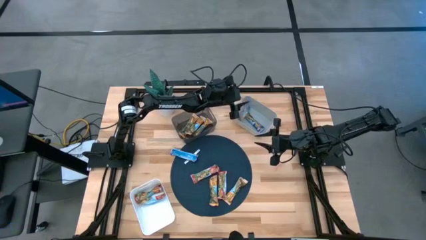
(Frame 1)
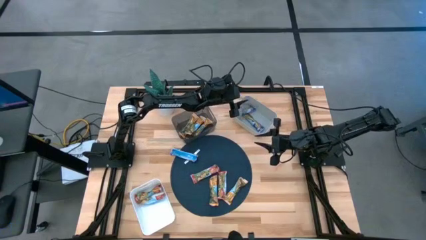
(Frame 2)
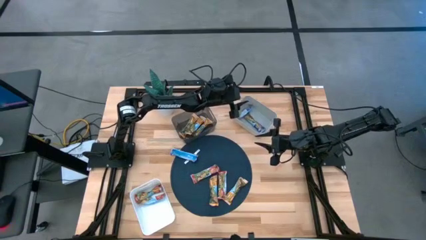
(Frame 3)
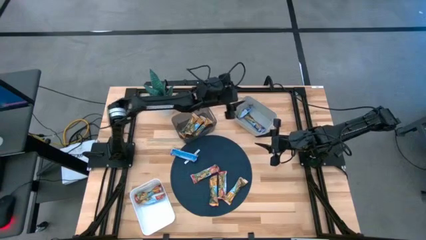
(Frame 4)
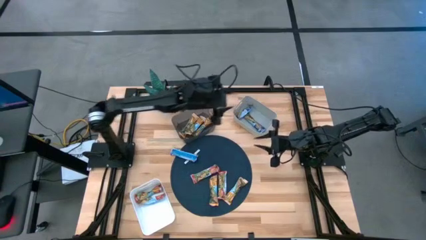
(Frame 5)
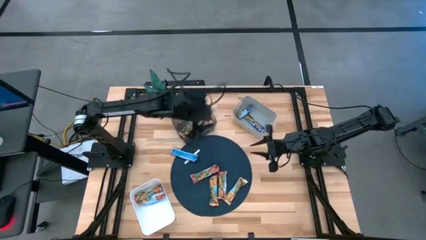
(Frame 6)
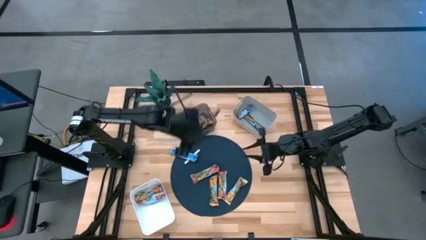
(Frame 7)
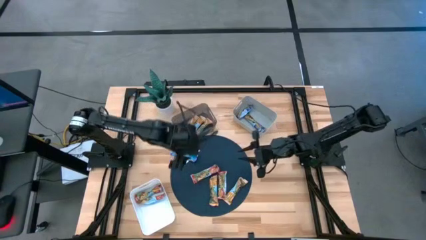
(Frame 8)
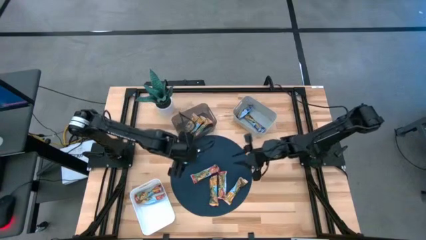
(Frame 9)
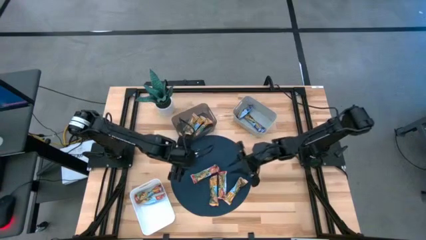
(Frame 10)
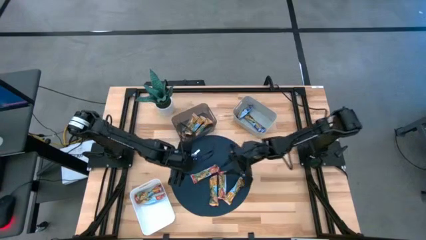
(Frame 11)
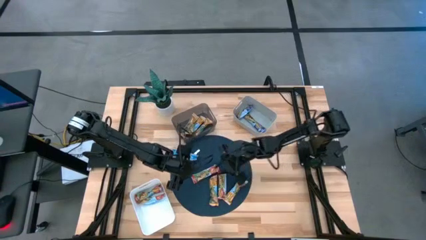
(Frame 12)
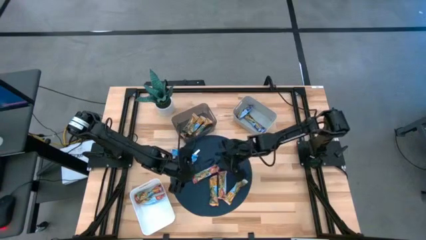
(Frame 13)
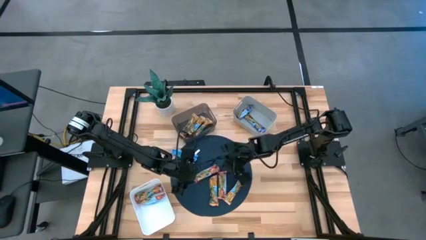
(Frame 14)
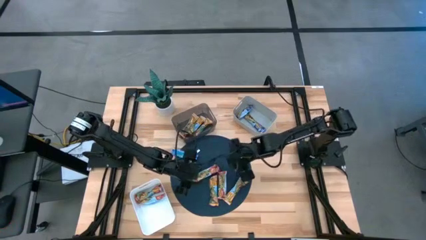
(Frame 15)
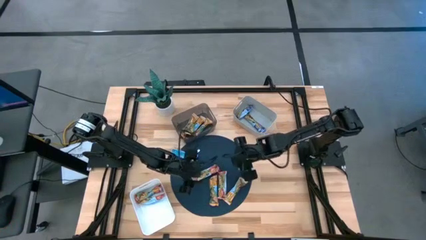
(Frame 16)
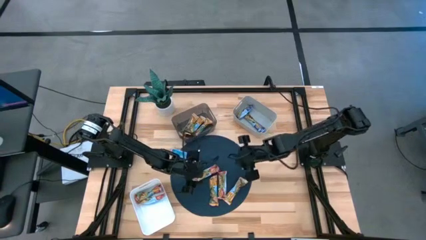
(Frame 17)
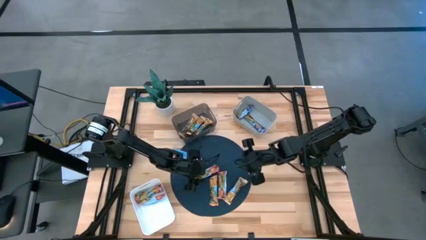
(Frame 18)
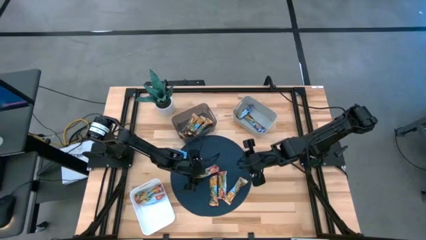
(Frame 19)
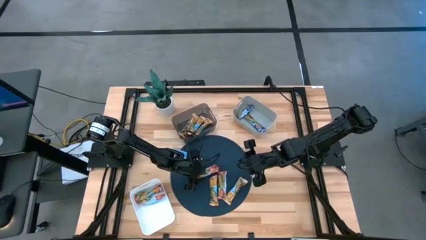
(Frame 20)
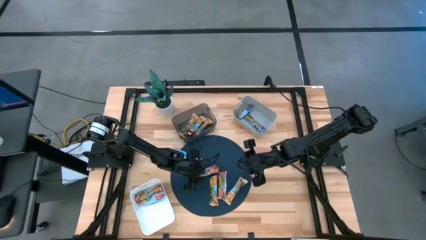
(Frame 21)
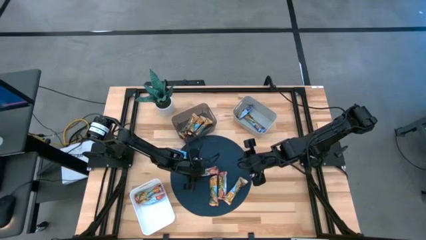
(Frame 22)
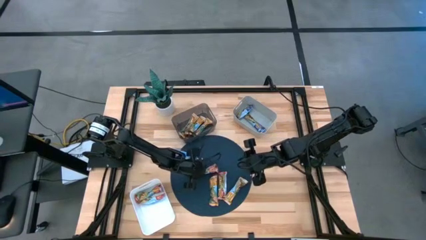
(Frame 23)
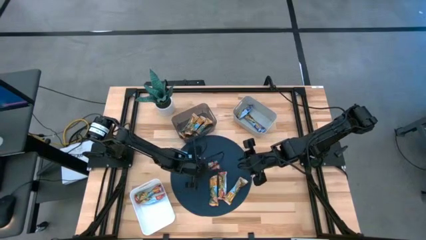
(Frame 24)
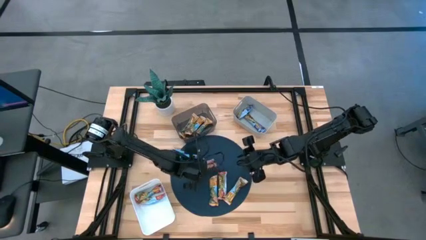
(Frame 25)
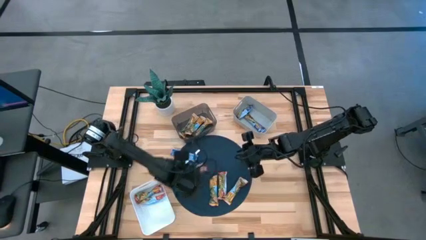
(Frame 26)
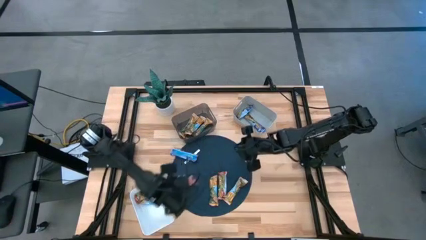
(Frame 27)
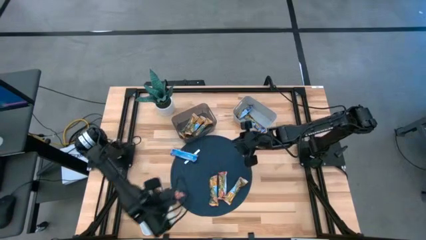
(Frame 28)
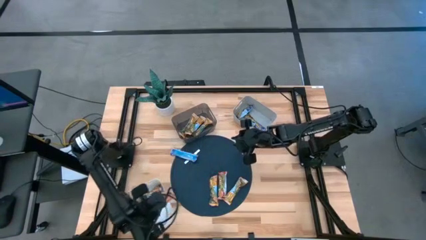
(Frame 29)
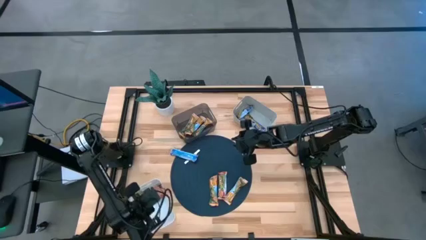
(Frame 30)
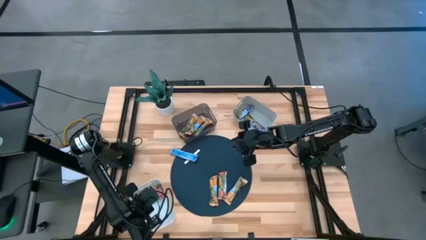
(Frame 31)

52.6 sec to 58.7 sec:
Task: Pick and place Granola Bars by type
Put the red granola bar into the white bin

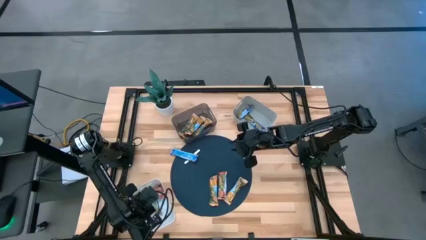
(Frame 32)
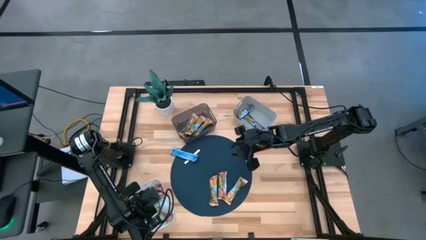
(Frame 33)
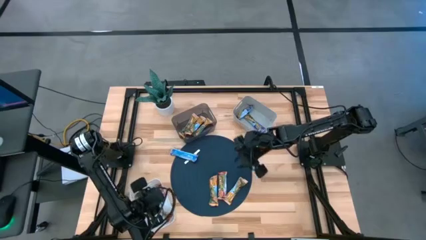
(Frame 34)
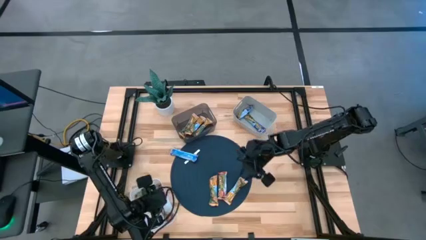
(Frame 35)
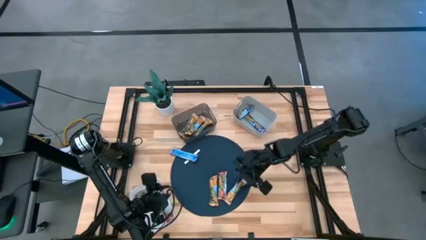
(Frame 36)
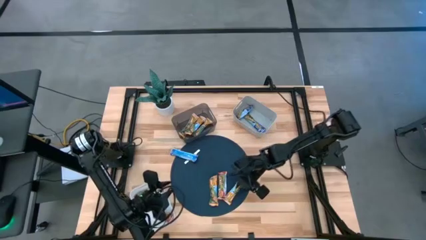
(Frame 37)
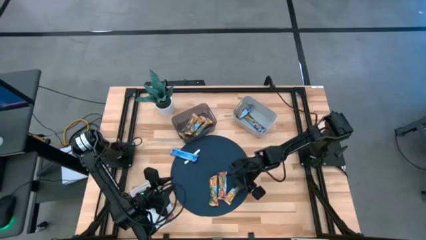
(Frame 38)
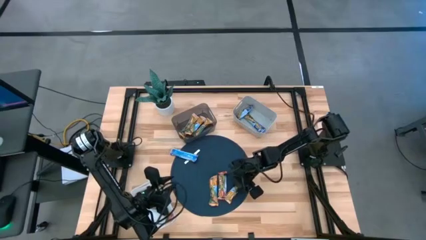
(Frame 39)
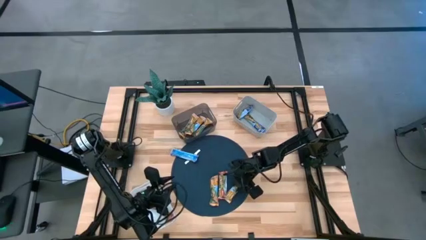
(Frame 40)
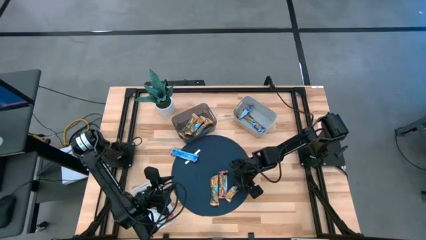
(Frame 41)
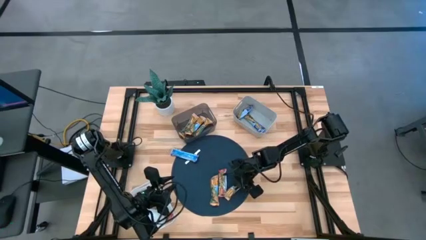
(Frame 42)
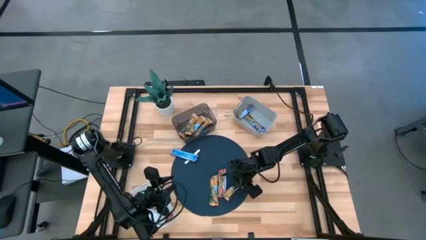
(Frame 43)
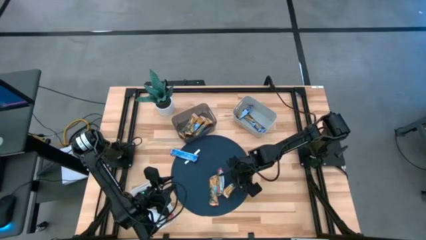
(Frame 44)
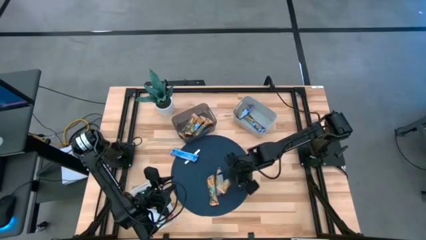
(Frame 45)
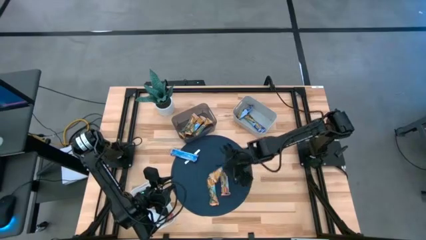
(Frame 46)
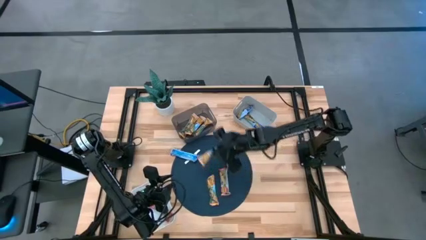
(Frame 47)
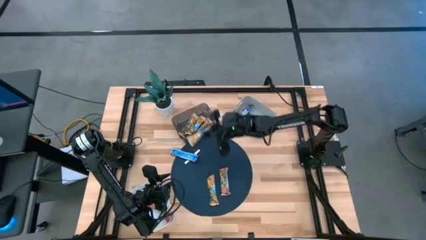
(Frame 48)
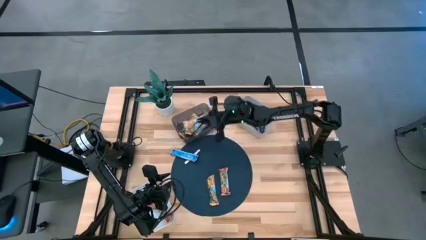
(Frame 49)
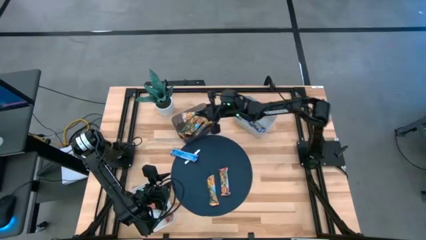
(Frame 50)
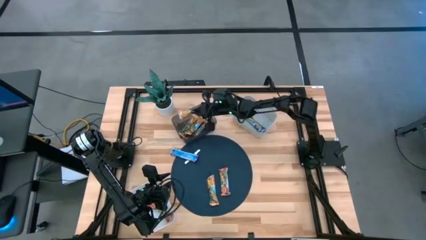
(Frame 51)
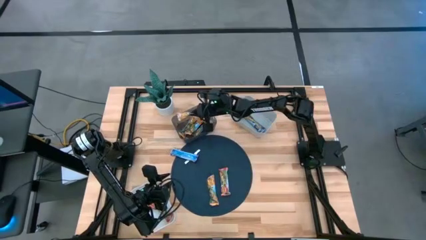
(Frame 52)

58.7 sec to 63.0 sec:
Put the yellow granola bar into the black bin

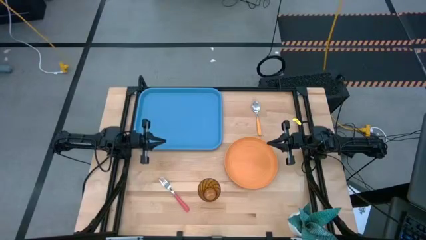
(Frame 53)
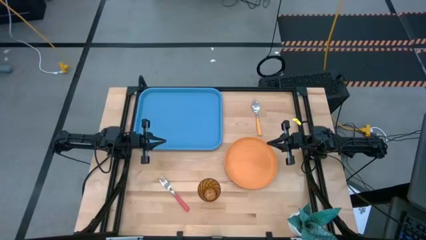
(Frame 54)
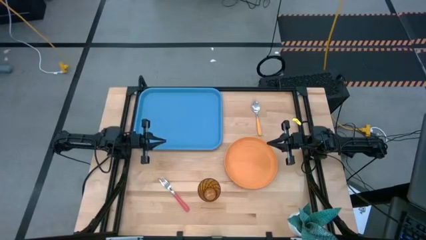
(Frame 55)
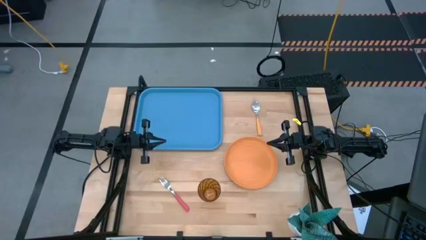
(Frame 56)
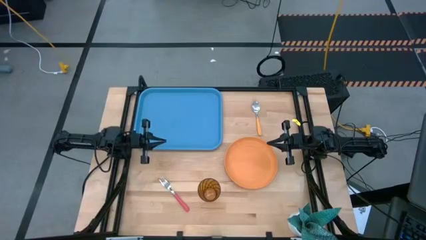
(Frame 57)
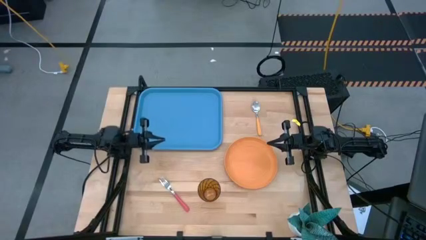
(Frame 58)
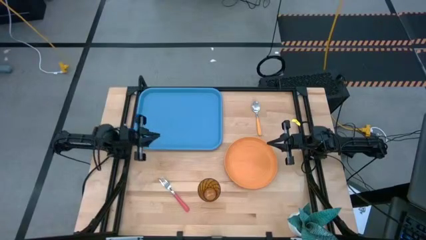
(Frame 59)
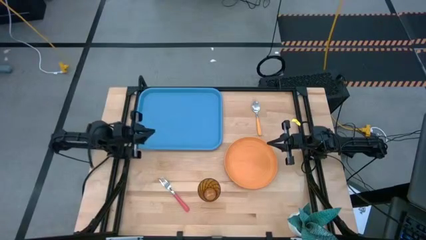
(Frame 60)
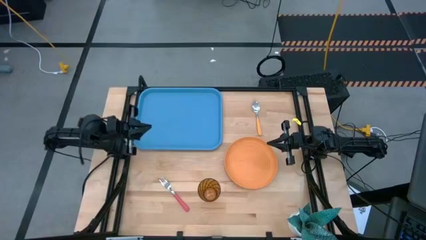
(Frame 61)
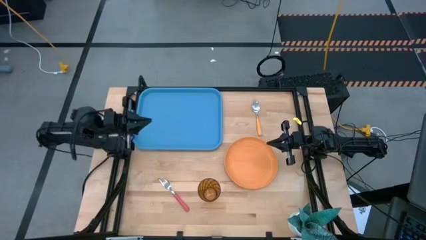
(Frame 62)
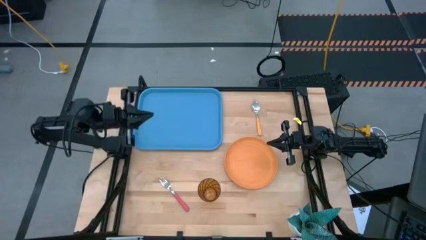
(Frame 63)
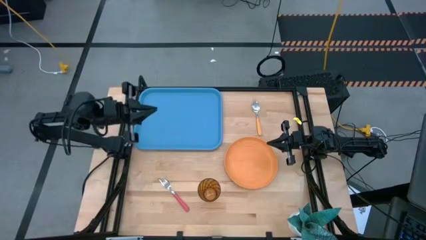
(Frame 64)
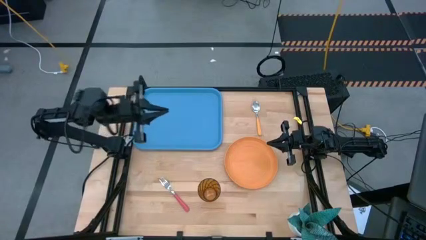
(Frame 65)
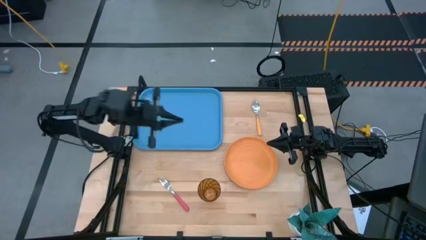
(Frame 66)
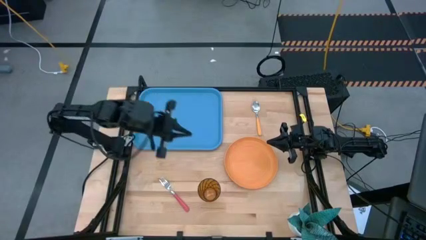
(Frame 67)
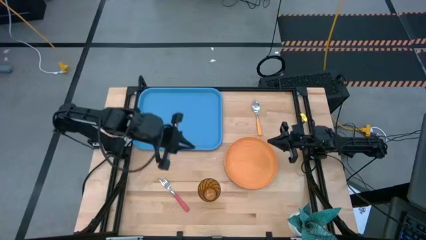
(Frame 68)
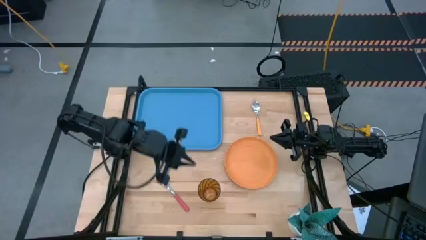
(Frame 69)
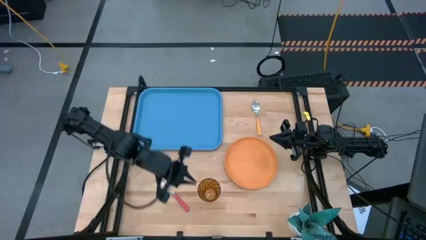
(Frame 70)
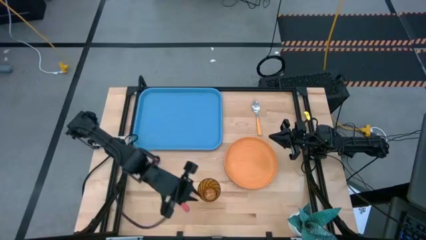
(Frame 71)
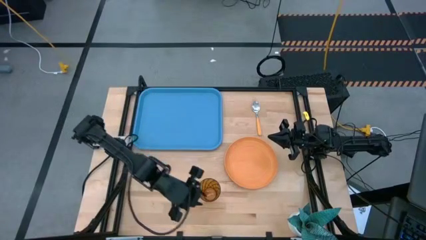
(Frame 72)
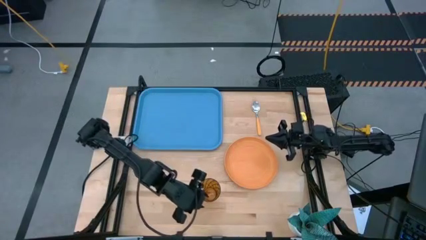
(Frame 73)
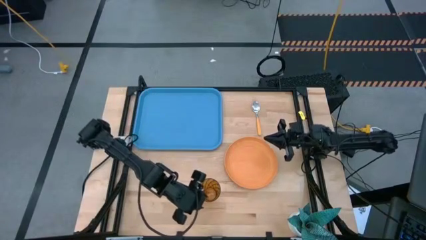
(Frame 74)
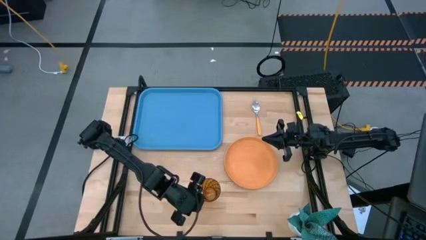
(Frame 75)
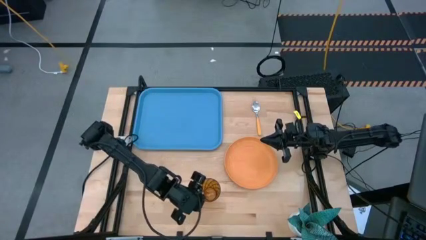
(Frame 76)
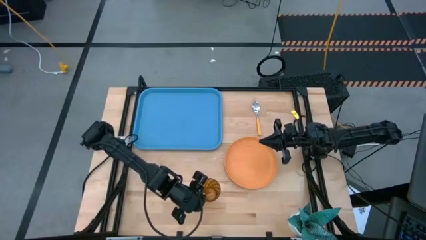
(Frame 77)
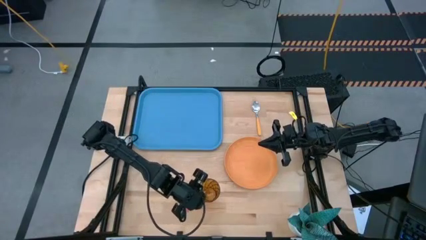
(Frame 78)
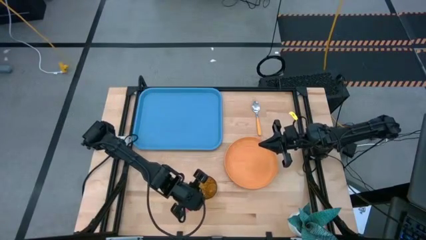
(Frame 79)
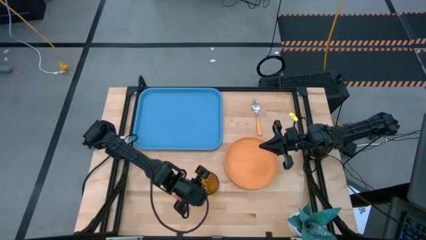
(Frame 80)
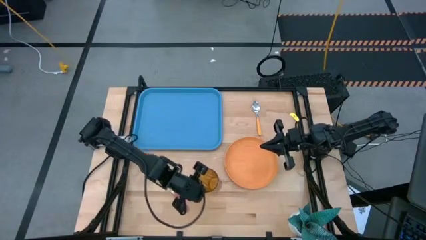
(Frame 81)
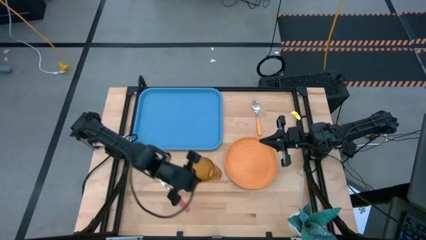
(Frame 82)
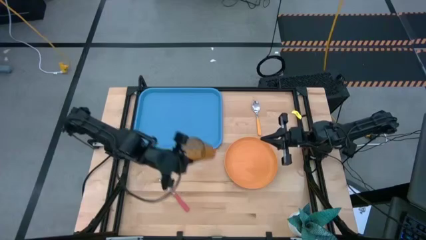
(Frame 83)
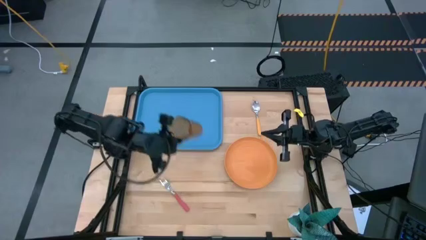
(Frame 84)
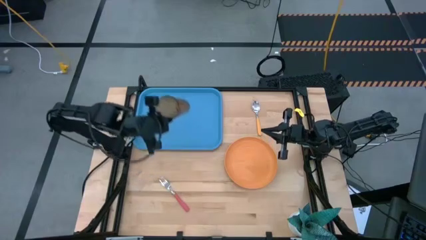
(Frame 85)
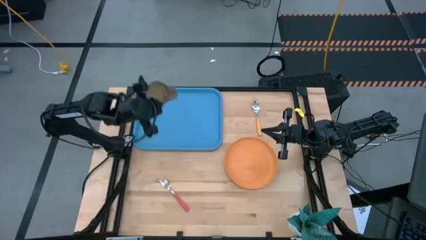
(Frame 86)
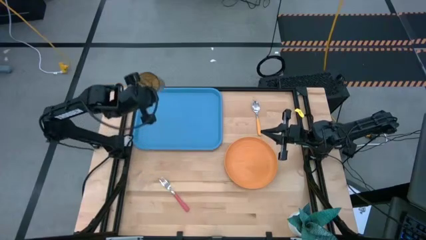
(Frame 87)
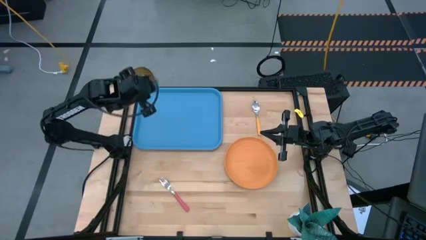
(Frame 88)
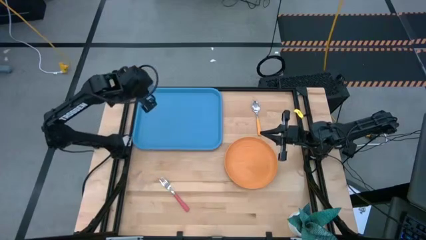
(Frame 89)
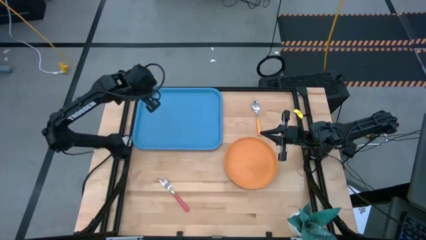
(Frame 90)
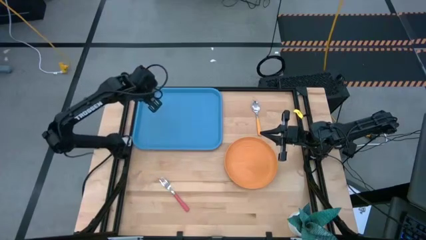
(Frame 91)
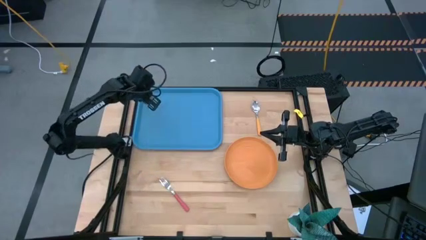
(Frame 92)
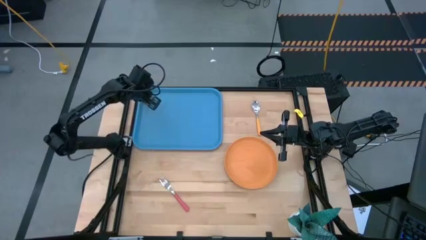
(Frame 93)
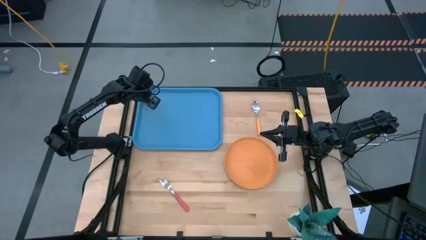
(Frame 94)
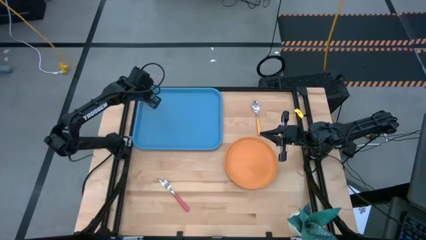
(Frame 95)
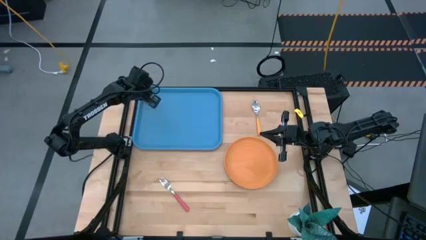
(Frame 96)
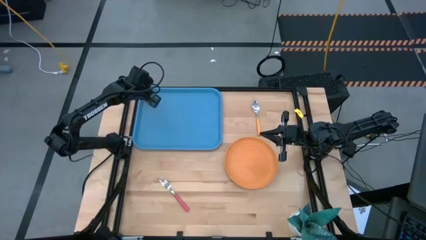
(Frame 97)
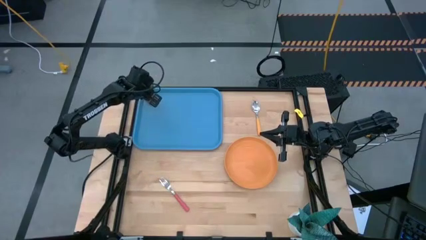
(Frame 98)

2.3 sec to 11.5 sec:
Task: Pick and place plate/cup/fork/spoon on tray
Put the brown transparent cup on the blue tray
